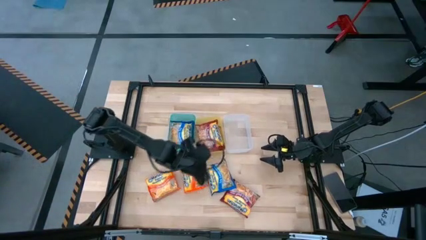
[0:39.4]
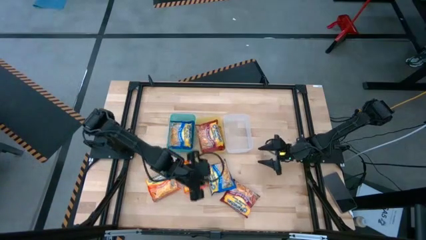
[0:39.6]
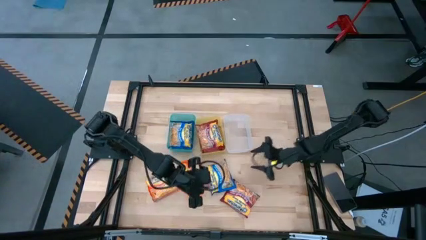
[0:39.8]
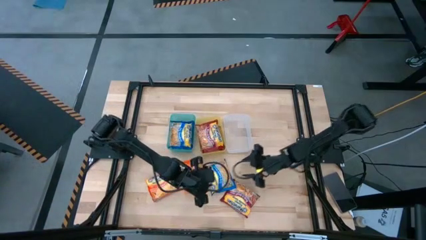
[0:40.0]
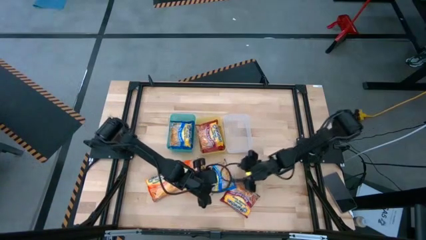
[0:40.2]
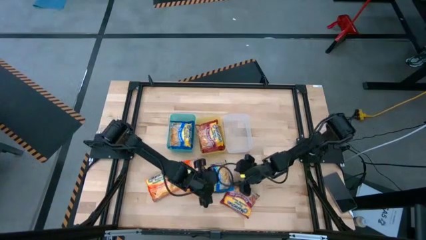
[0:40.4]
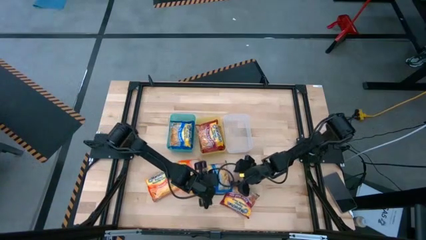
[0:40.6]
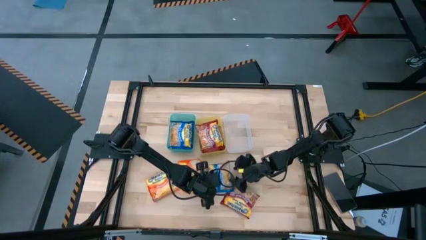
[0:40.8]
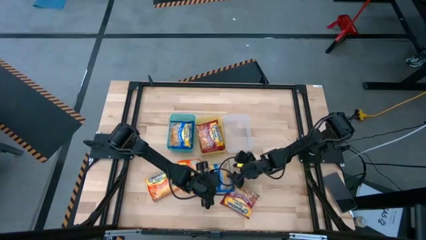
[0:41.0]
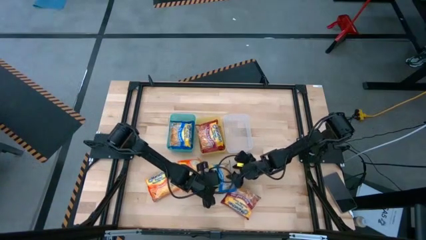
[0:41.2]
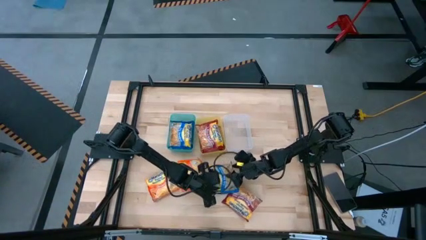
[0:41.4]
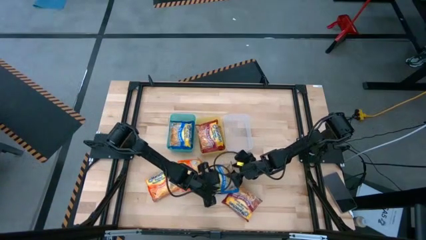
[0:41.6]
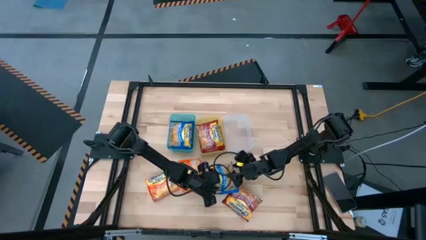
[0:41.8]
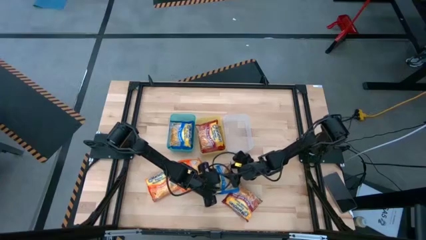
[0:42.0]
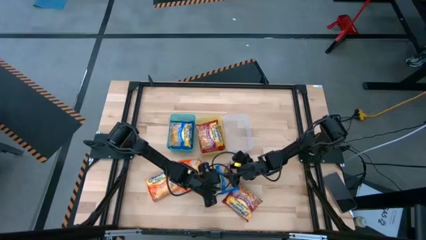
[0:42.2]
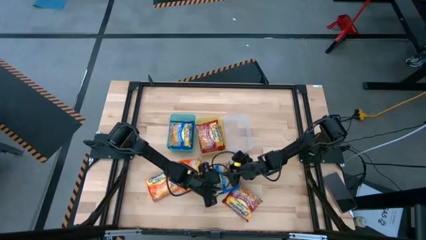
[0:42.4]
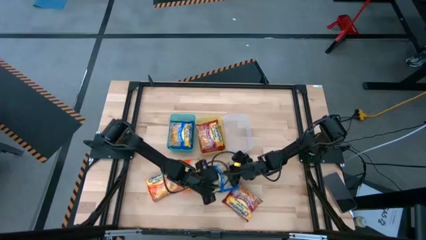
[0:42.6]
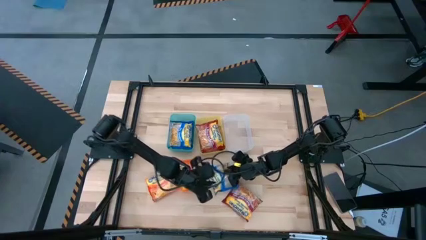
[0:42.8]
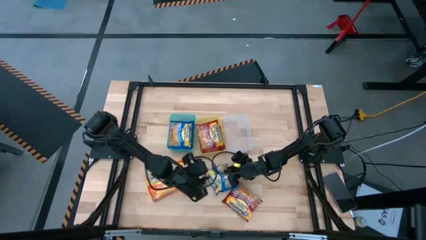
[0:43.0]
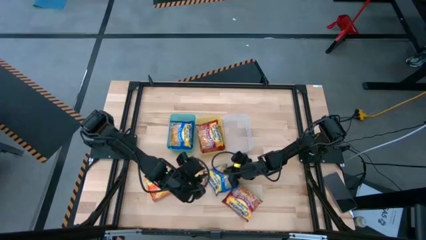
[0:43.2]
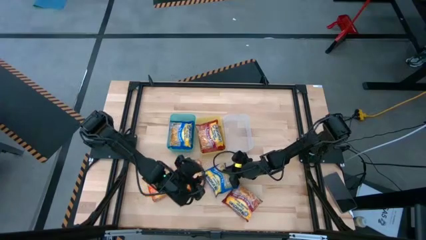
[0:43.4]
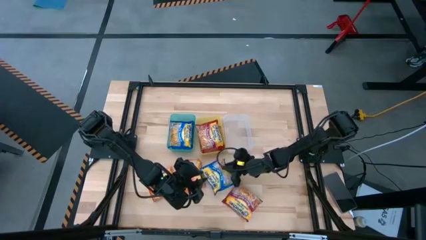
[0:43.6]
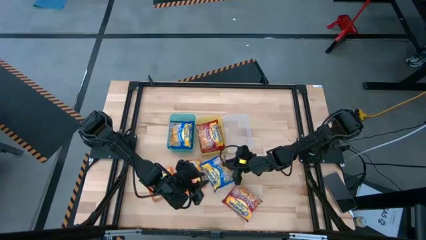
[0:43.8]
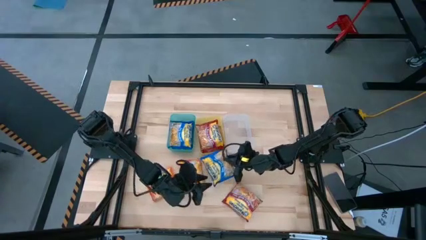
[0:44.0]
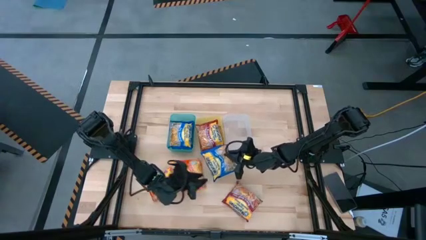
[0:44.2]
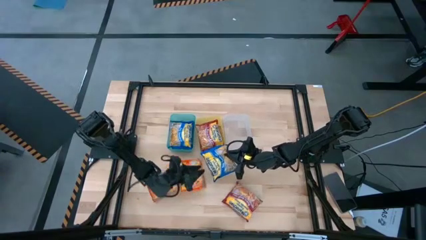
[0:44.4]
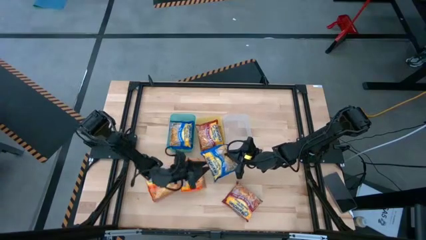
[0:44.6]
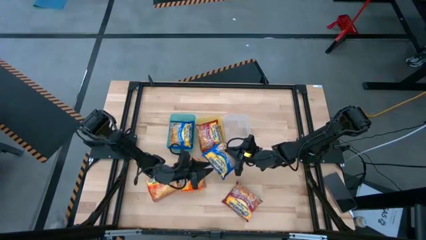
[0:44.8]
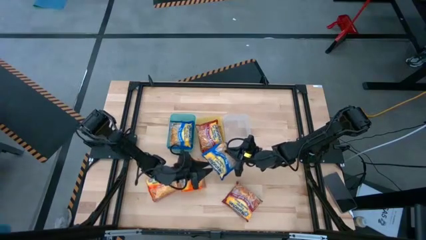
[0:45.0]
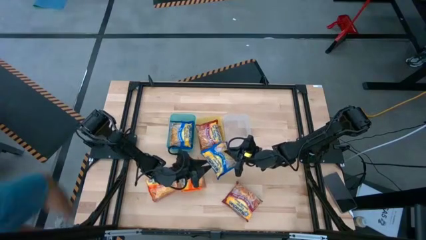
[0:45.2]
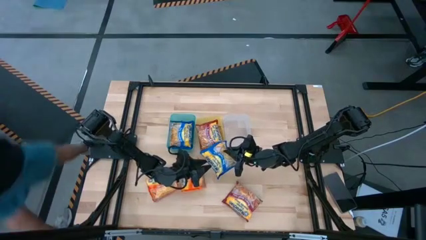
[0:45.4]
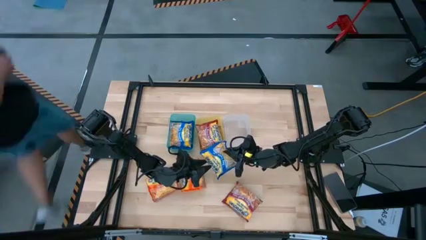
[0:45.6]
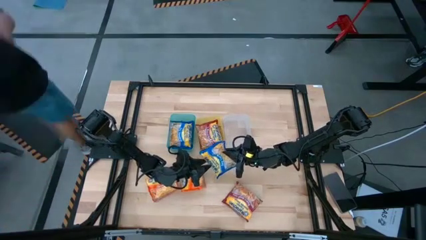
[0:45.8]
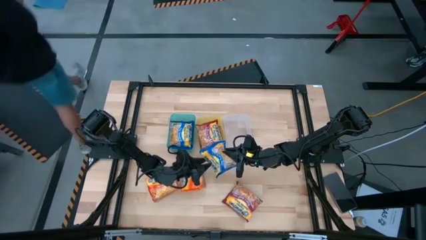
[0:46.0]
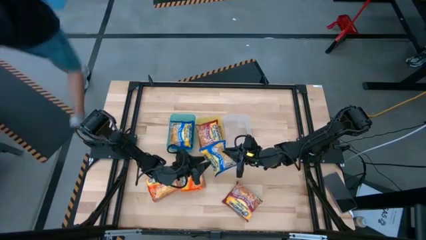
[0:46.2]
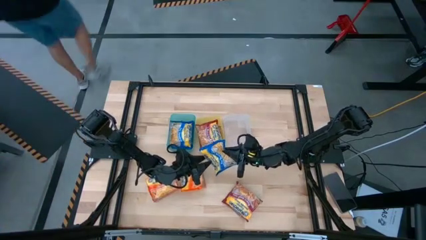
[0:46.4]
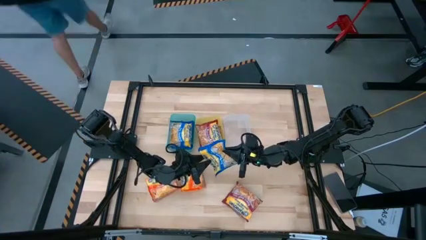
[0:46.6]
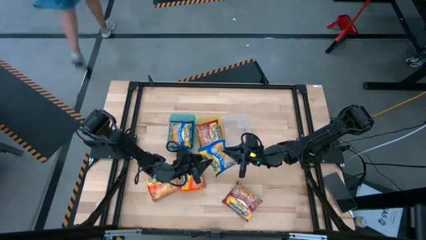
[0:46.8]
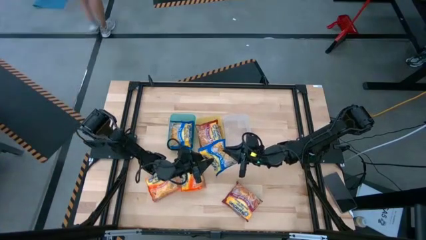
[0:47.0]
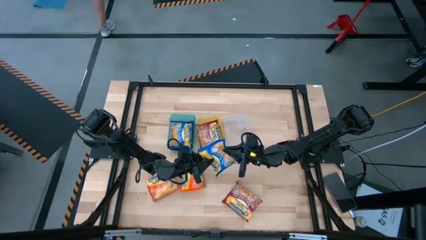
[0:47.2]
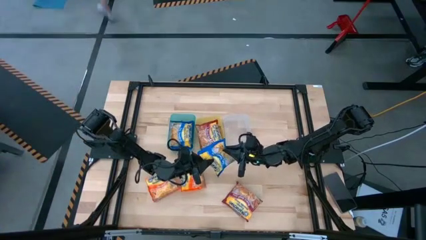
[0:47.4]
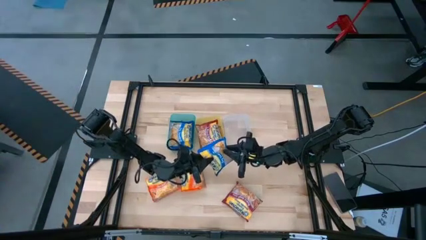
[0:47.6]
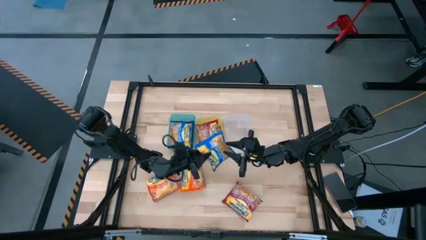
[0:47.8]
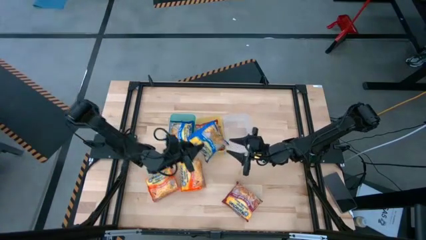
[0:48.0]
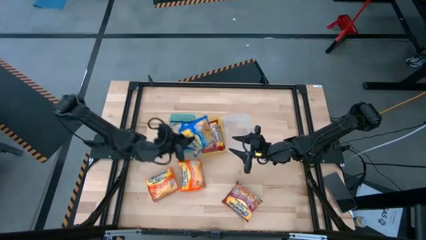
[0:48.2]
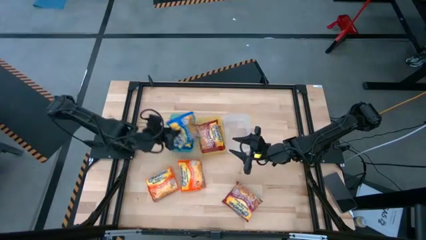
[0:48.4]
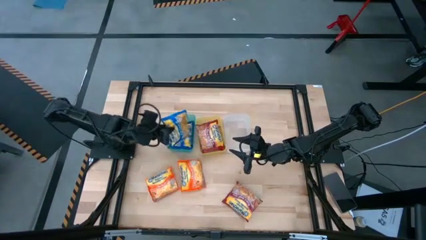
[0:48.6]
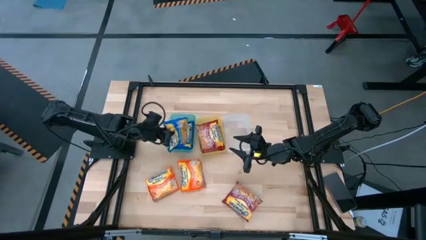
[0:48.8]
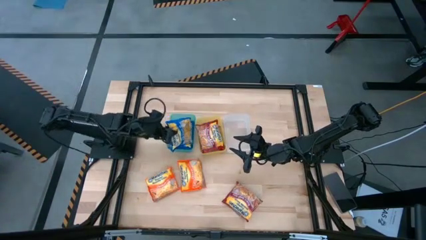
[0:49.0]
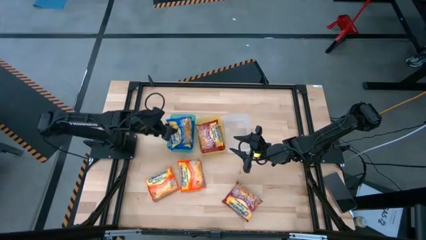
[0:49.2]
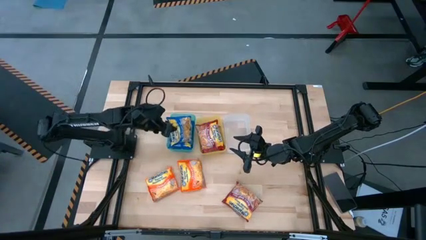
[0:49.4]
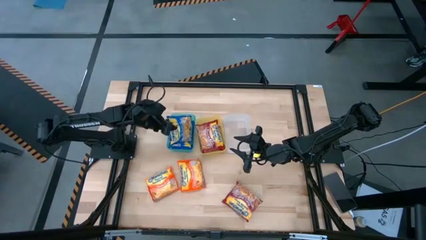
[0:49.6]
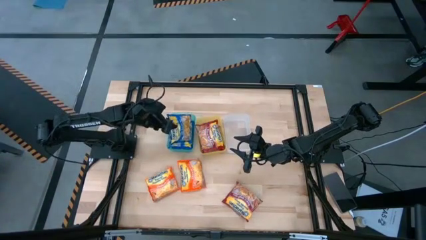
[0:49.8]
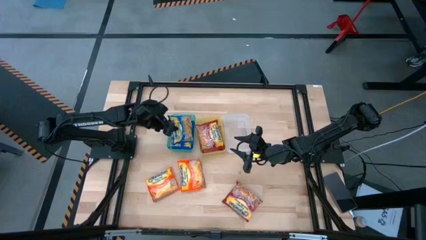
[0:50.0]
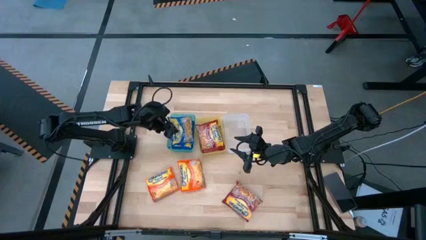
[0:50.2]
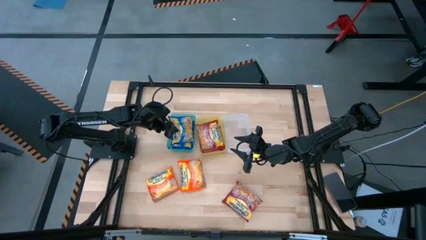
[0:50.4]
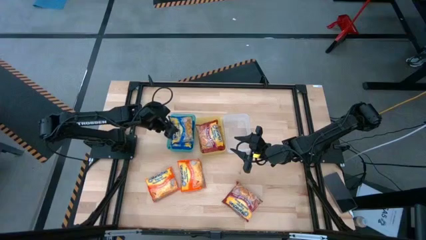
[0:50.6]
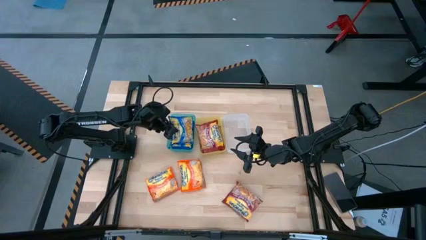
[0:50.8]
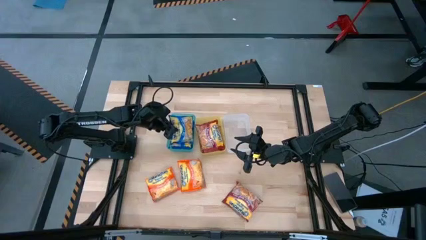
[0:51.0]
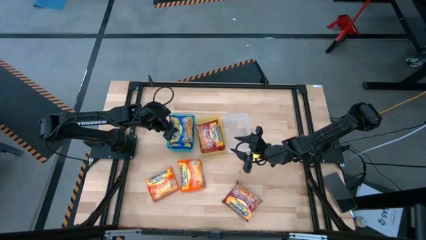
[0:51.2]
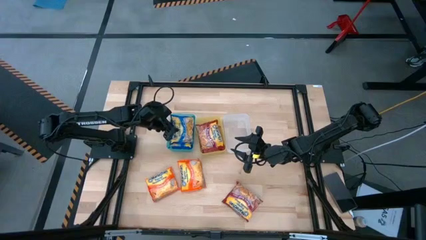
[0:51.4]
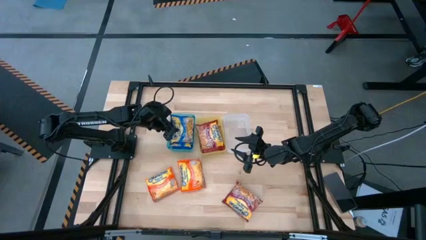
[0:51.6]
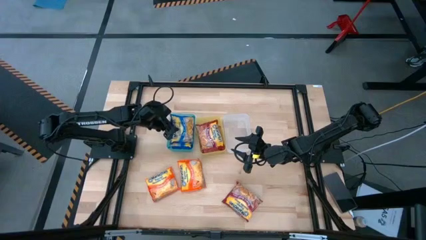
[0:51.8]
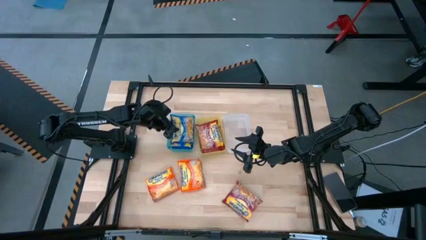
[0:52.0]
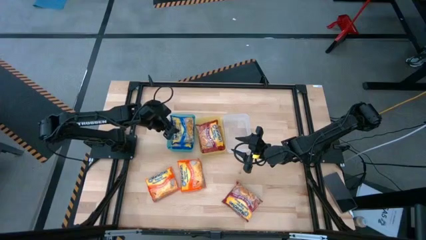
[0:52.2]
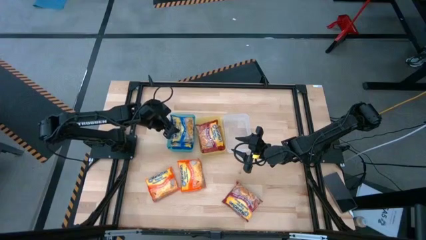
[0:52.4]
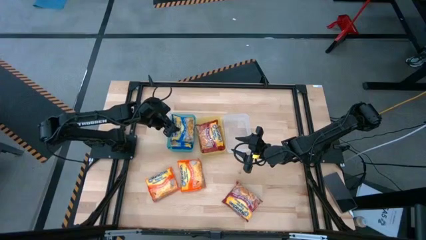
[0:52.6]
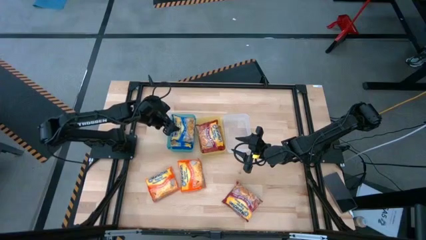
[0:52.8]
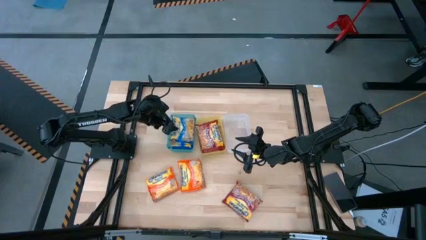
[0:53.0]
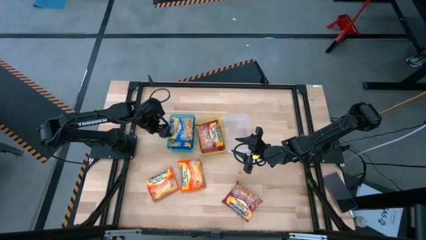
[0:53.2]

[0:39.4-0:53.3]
Task: Sort Maruchan noodles
Put the blue bag into the green bin

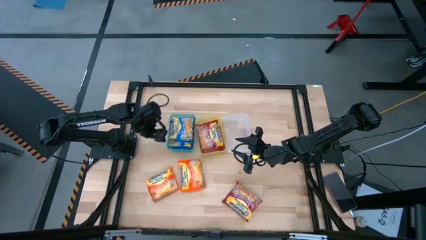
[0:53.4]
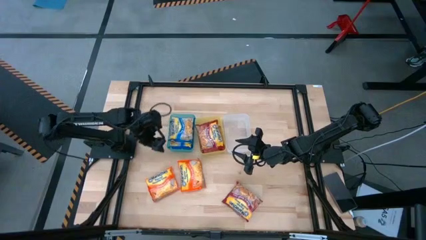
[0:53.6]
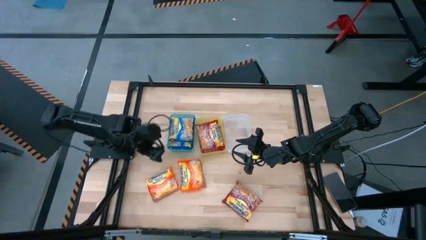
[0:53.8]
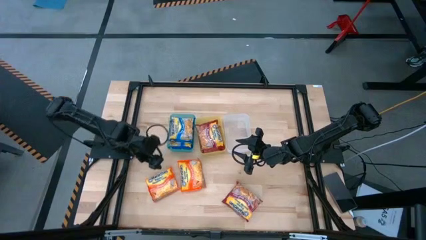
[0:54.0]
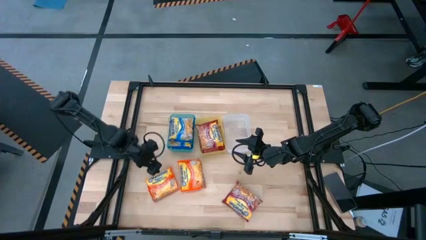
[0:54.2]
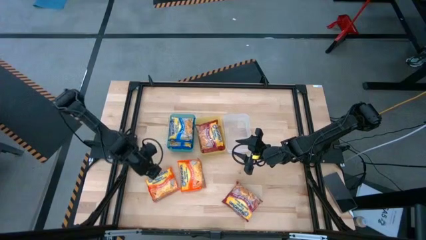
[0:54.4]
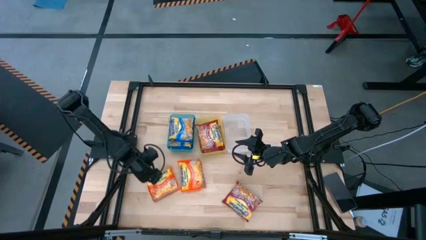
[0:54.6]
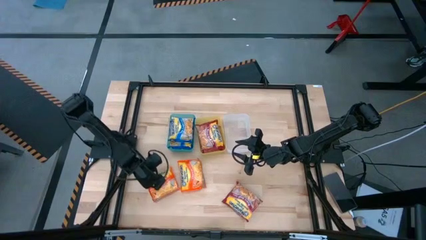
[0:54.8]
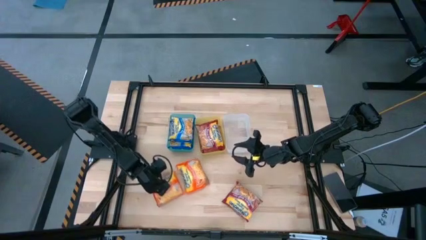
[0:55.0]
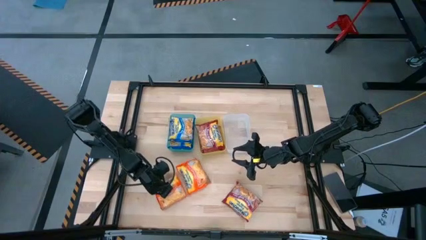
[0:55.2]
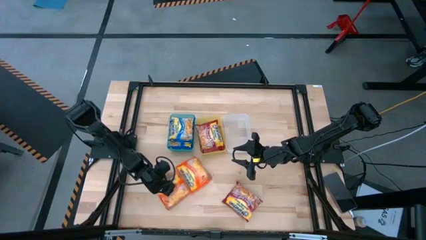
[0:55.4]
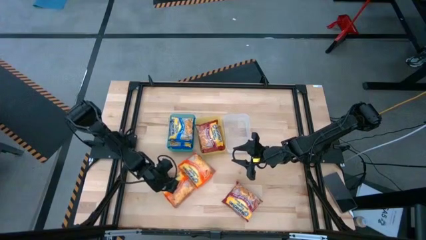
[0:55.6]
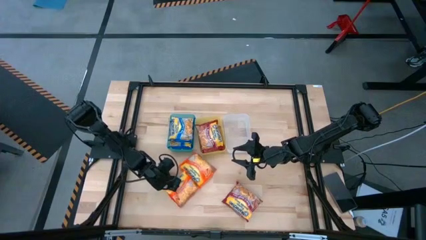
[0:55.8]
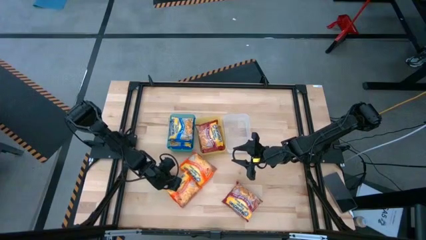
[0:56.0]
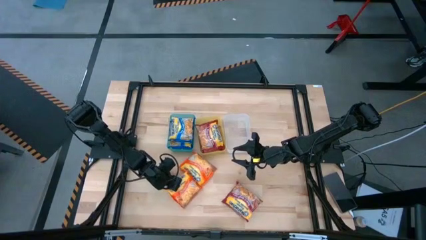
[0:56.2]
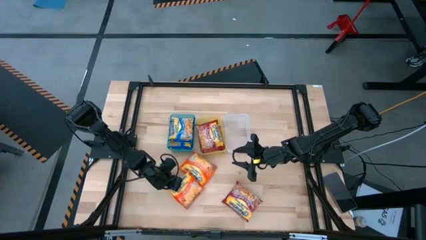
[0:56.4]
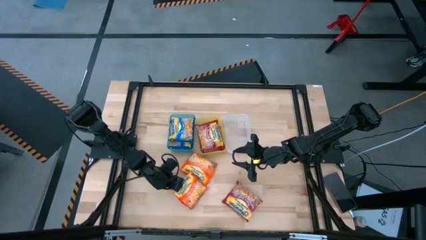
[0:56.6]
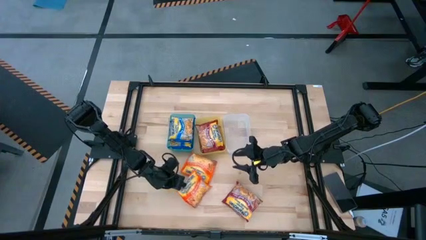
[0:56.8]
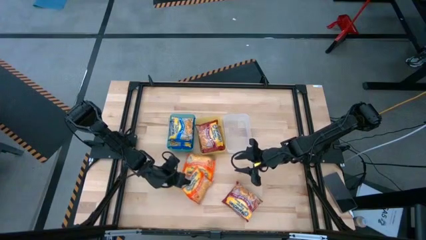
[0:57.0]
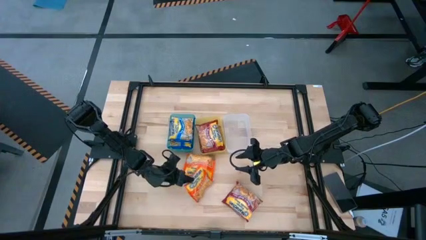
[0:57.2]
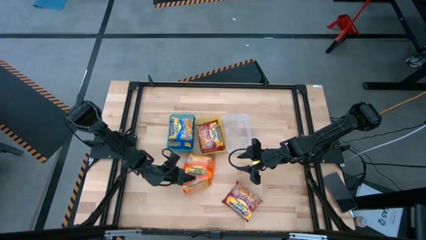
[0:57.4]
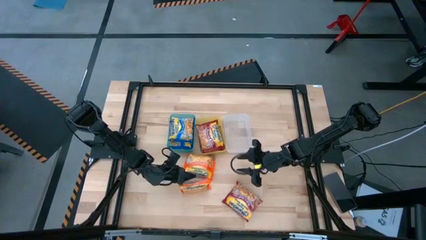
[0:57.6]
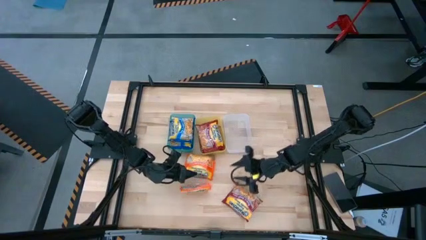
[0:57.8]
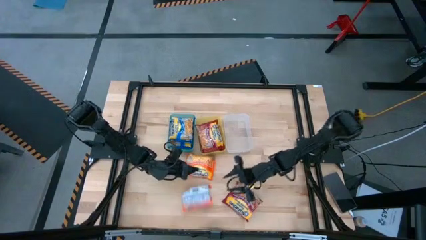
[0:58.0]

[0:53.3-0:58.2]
Put the orange bag into the white bin
